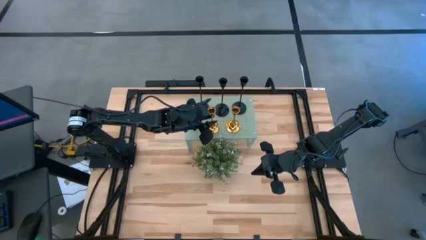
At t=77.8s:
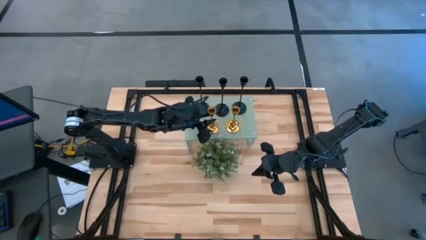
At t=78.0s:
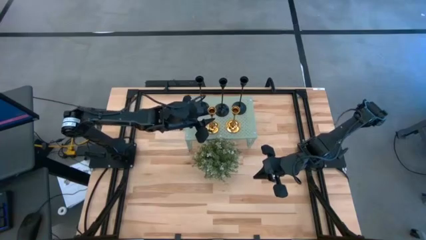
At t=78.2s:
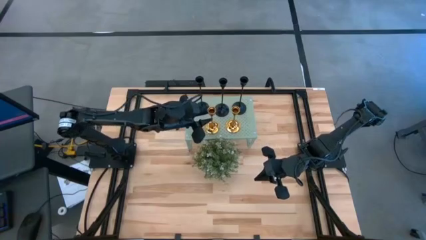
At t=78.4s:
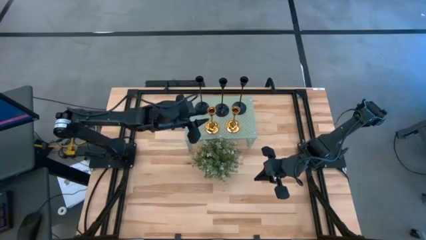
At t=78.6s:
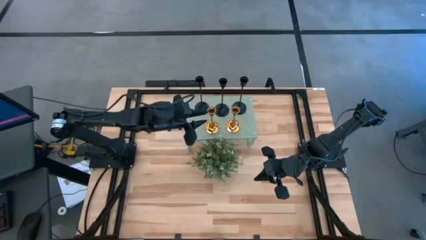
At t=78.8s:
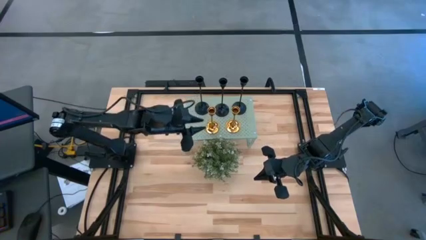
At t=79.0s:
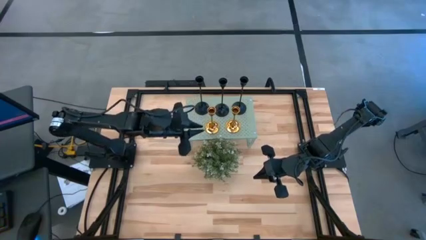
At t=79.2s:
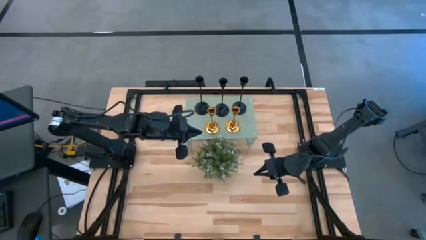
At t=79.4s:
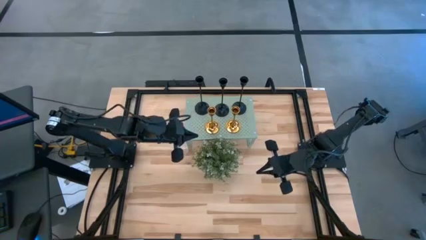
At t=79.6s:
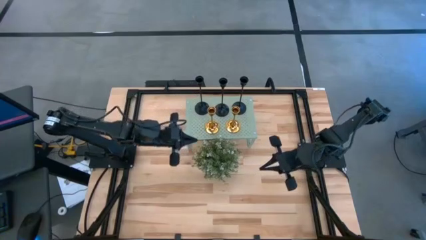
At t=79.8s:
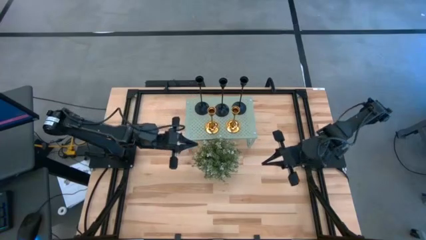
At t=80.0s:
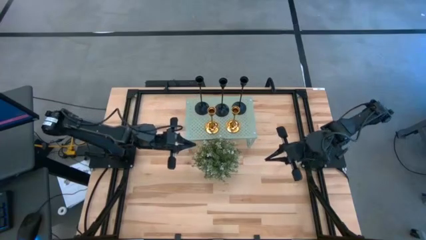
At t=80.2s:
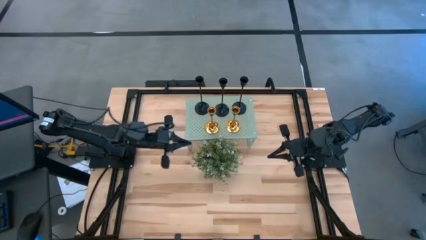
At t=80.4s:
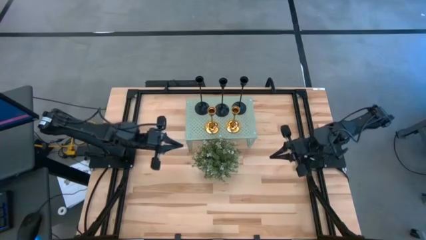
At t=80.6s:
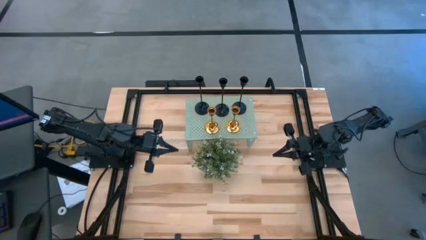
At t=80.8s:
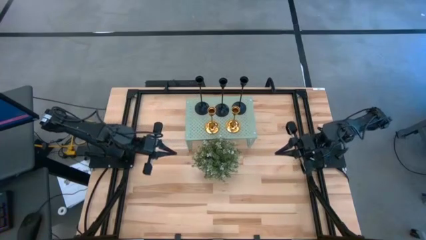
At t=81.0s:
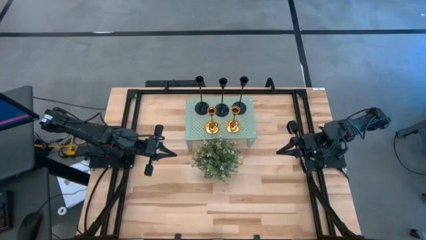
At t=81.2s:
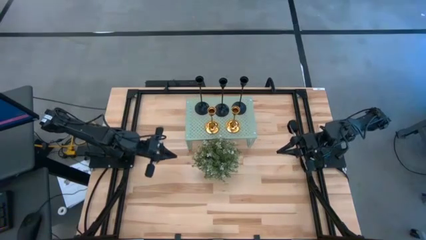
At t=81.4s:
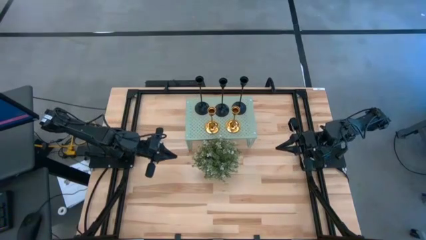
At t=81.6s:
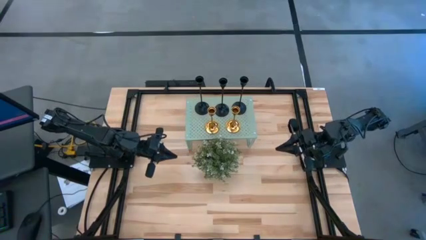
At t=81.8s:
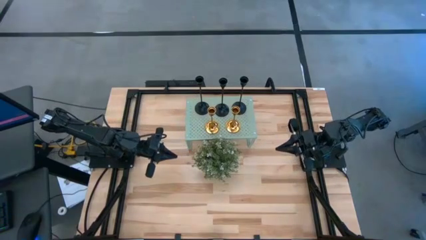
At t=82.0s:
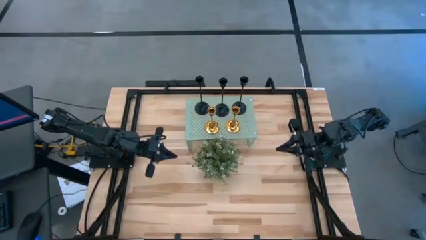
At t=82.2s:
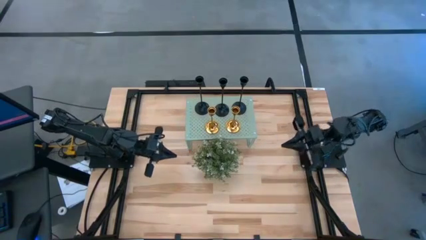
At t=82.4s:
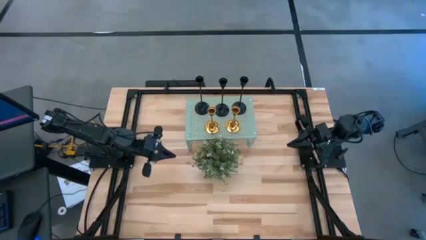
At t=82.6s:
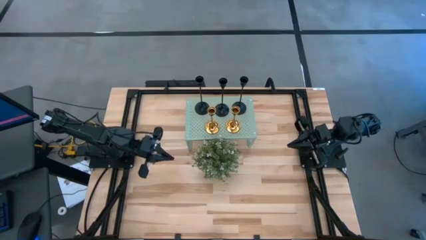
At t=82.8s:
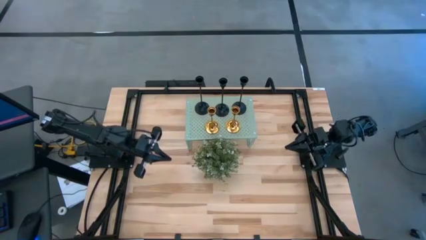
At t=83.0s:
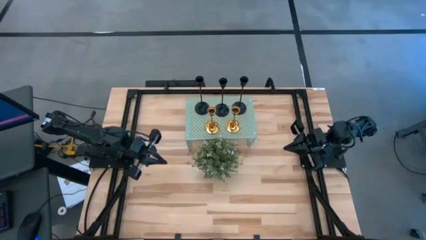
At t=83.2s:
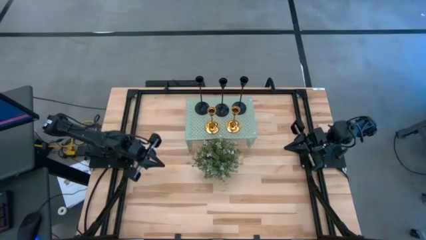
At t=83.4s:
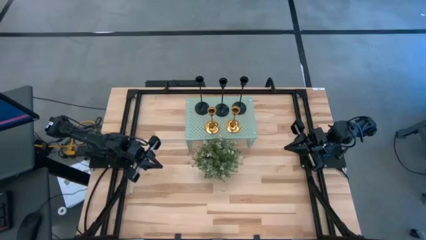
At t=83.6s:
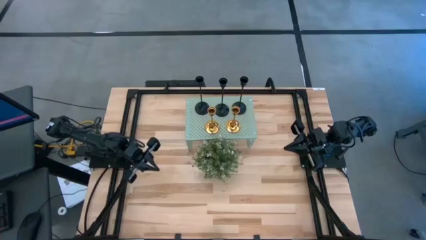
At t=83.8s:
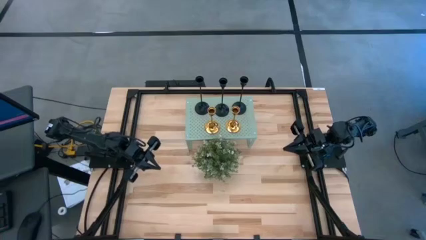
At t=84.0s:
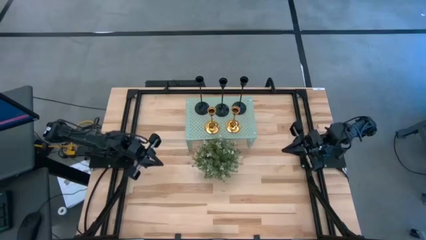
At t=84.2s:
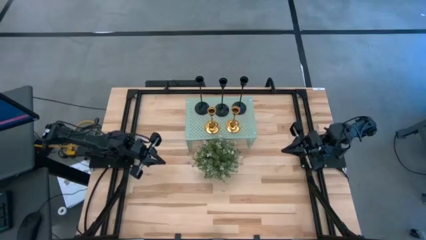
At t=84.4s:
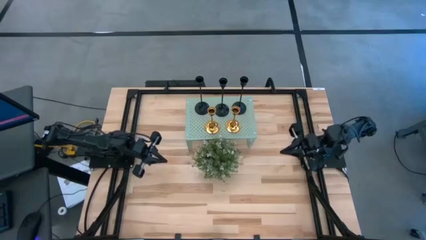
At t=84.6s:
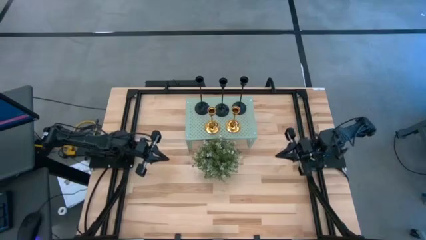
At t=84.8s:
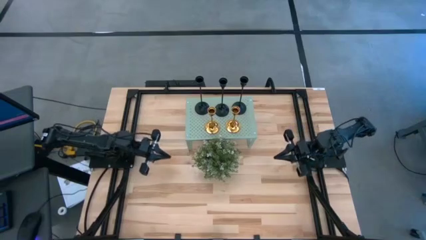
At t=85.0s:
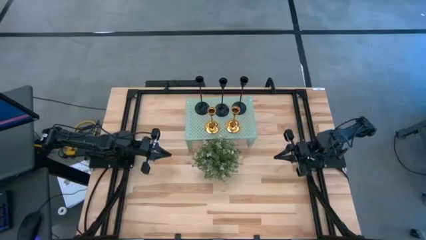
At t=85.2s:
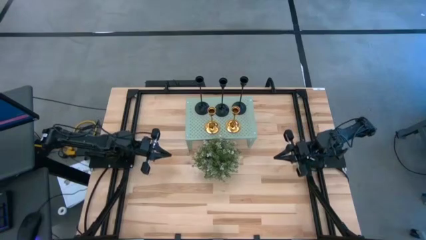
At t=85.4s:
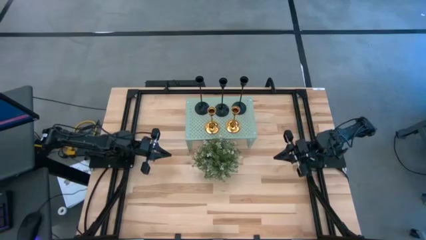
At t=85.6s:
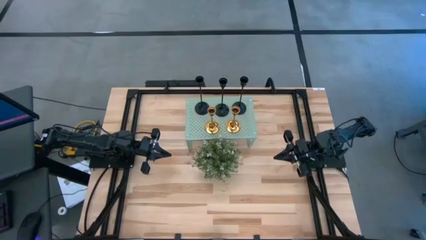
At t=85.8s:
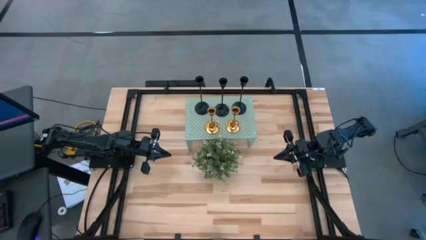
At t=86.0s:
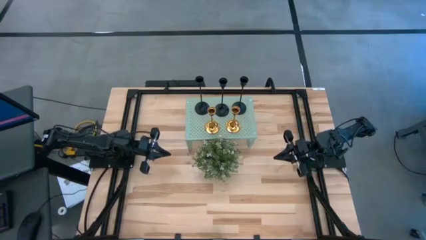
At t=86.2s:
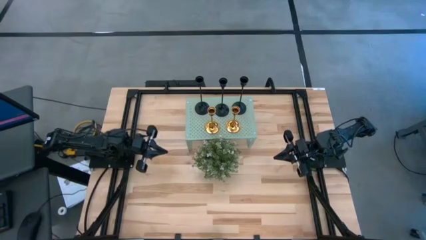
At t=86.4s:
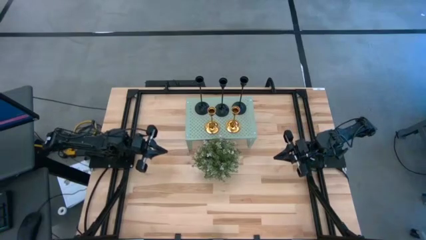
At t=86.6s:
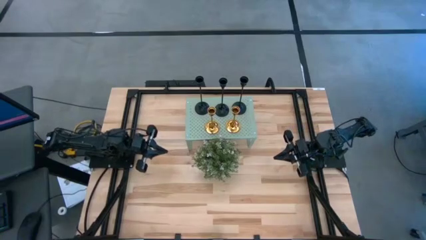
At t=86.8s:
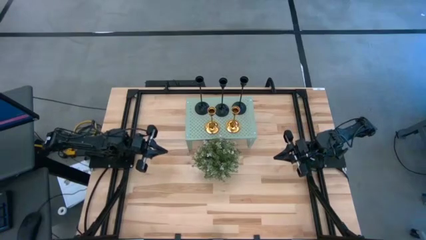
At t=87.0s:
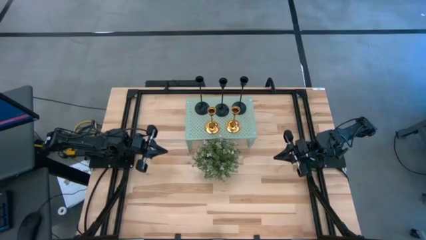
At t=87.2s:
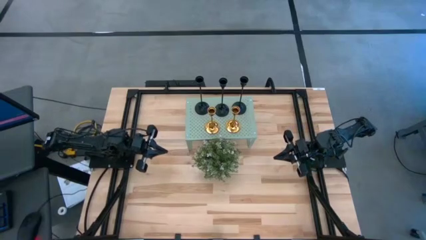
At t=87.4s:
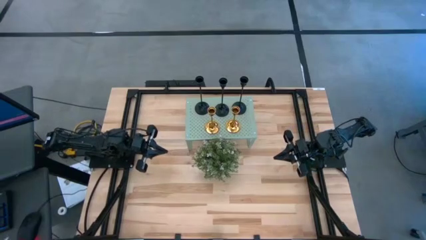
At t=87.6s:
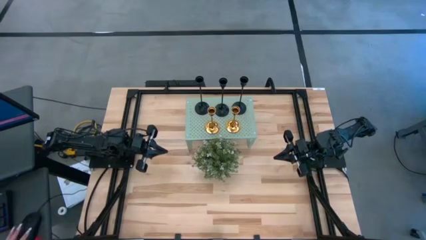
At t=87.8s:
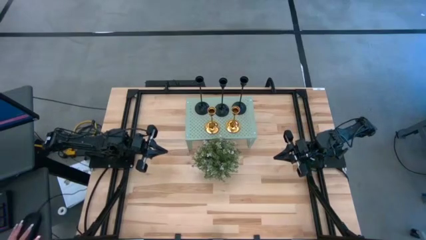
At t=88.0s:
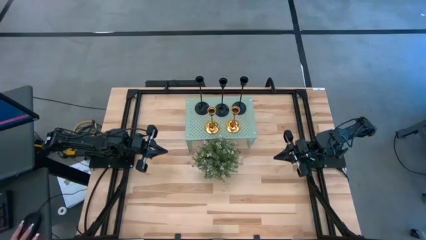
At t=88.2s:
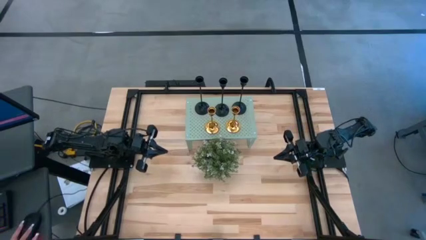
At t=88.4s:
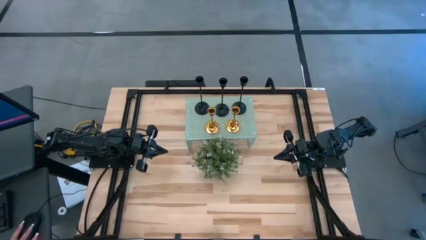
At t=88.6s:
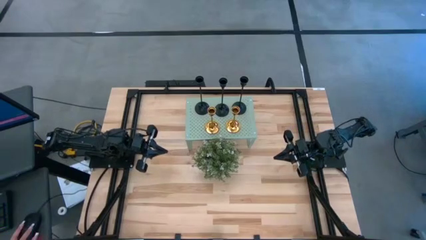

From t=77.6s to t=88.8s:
Task: Pick & Place candle stick holders
Return to Home Position

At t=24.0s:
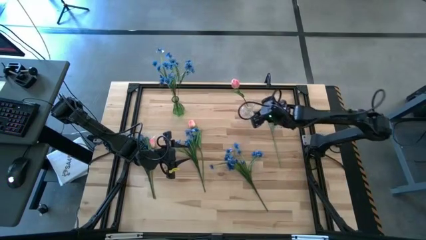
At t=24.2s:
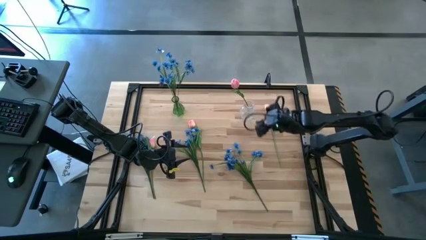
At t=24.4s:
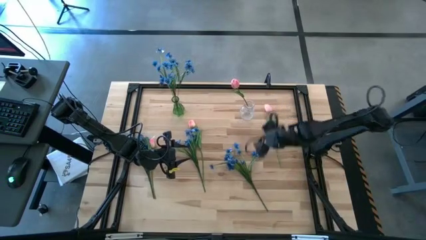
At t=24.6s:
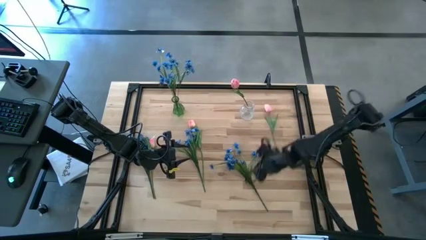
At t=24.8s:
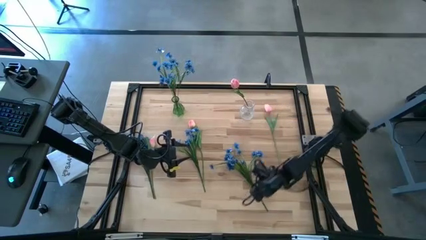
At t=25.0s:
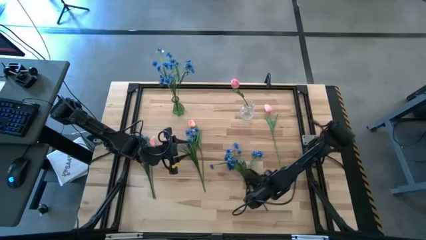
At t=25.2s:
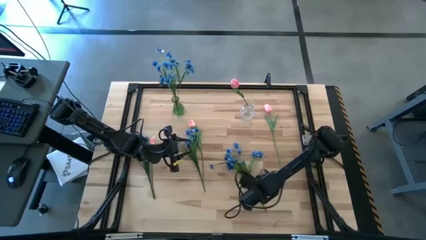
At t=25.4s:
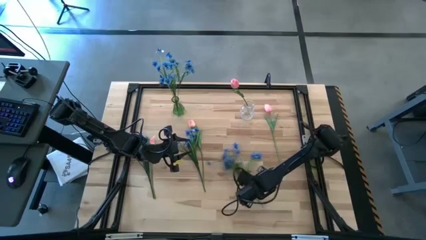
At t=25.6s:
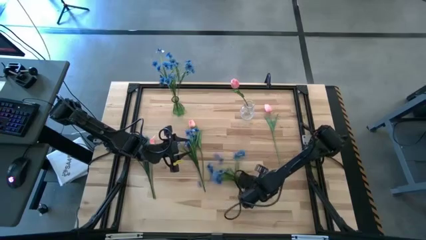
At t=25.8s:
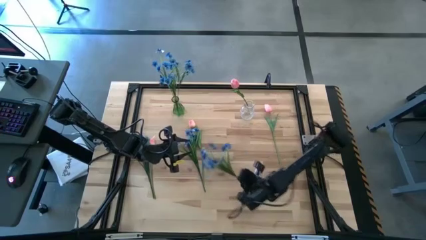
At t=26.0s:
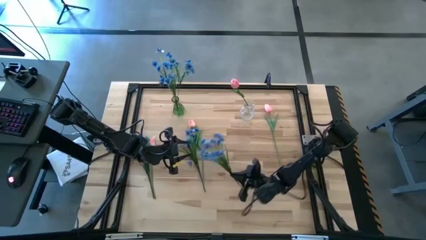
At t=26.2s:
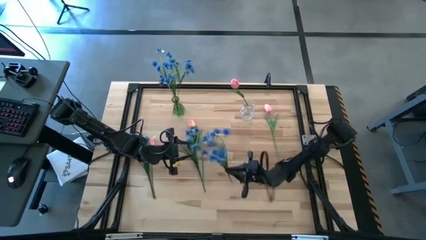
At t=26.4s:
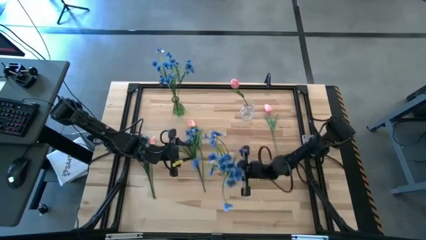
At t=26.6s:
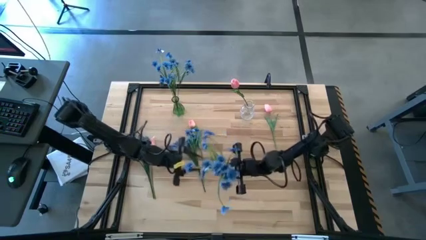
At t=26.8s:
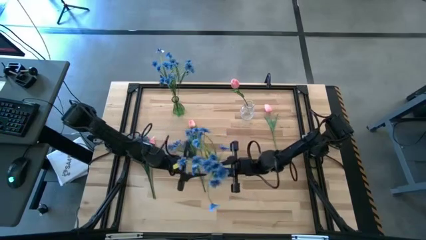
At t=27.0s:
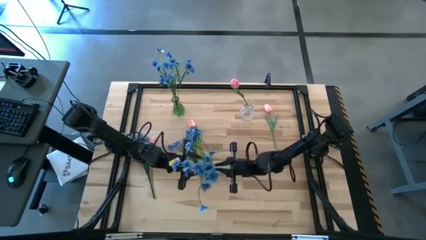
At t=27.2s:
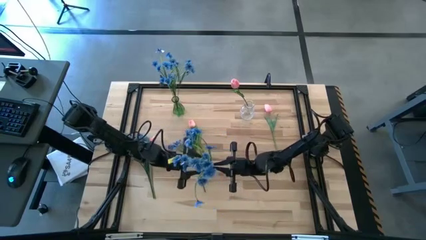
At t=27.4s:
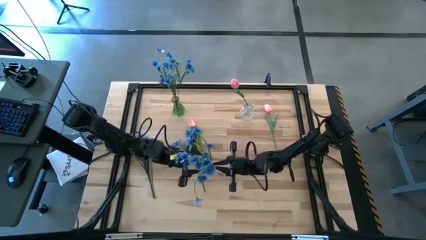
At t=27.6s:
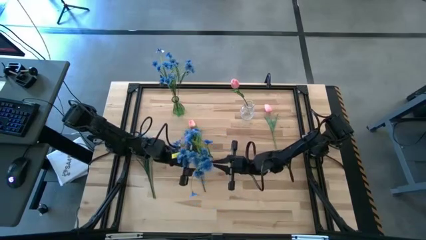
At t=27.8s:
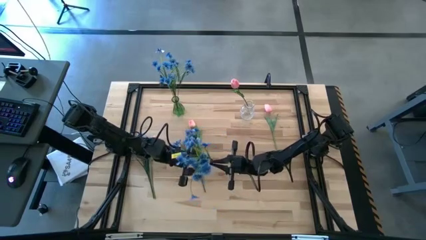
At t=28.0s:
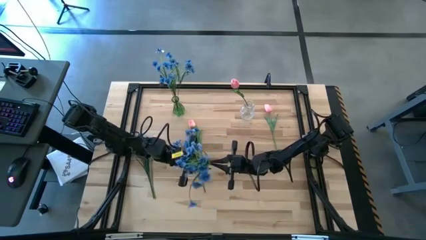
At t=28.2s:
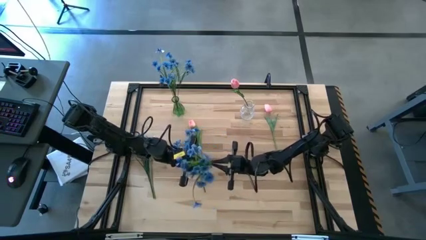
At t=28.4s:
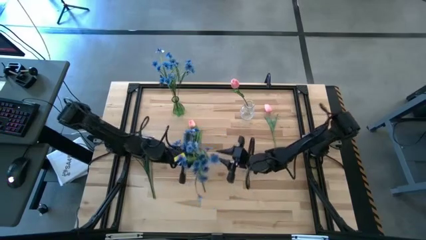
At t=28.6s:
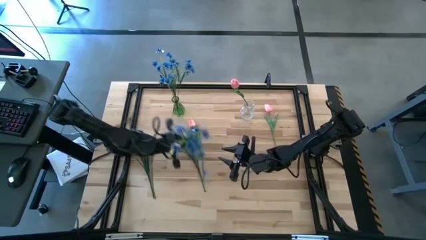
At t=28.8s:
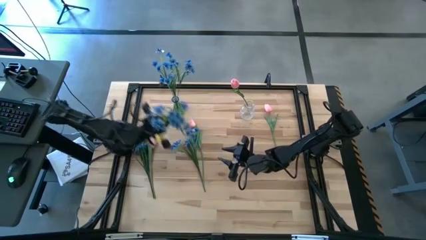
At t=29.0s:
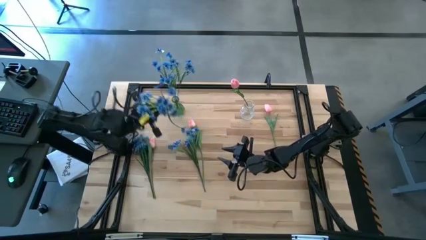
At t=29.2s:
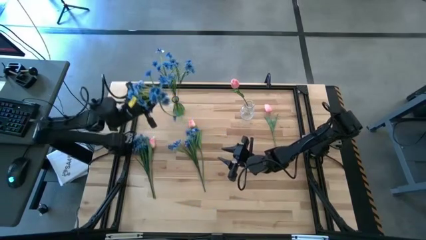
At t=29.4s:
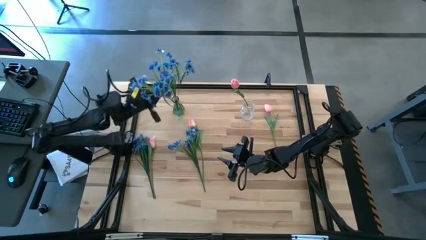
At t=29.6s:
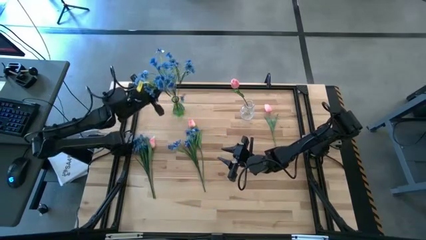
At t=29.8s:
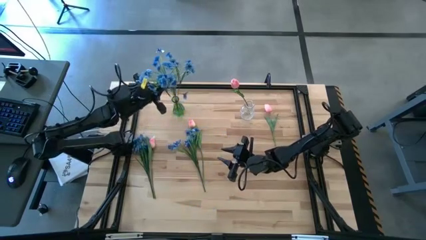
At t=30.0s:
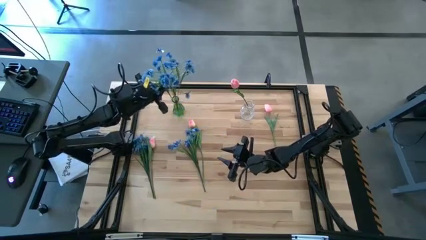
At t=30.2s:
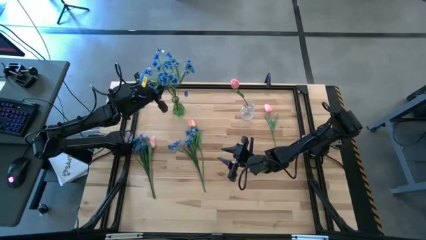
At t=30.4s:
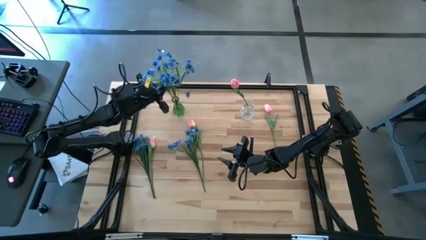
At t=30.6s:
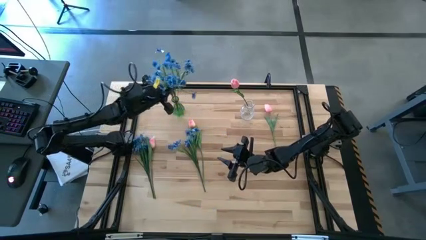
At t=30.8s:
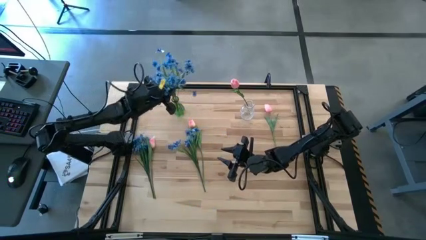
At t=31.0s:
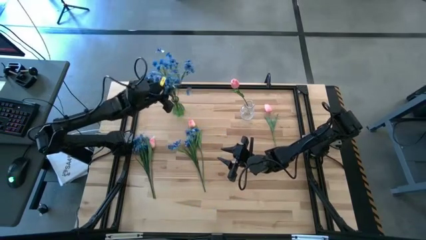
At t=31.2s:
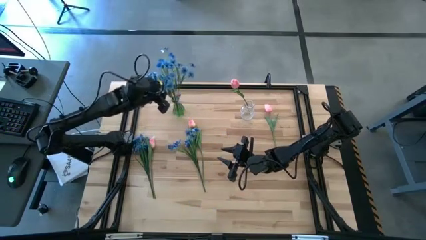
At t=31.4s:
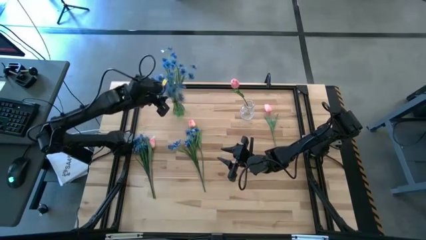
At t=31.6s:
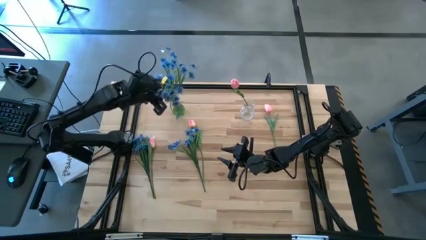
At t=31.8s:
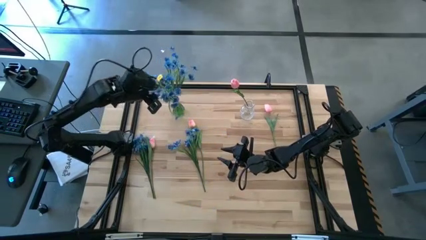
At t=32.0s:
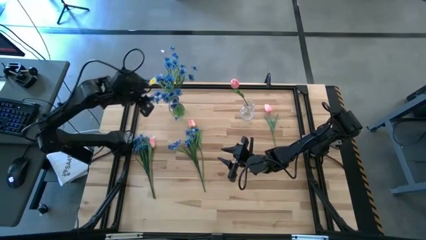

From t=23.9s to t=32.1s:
Task: Sort flowers into vase by color
Put the right blue flowers into the green vase
